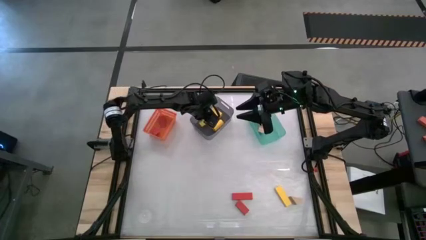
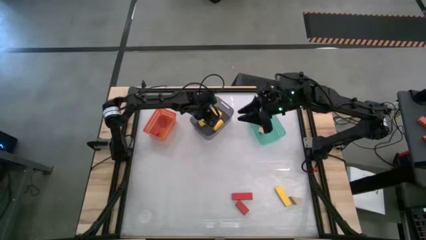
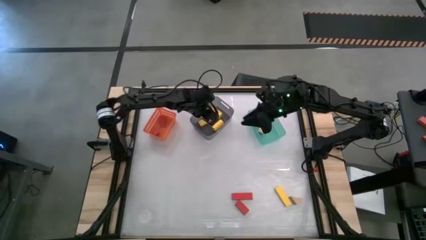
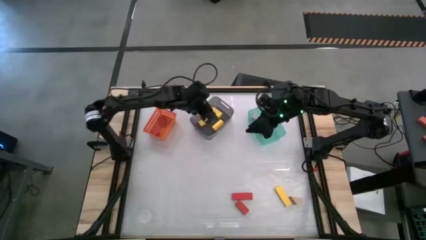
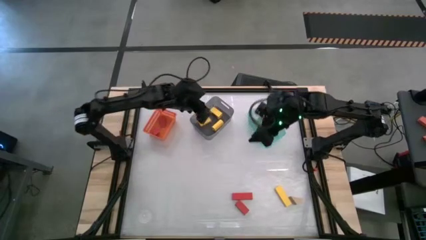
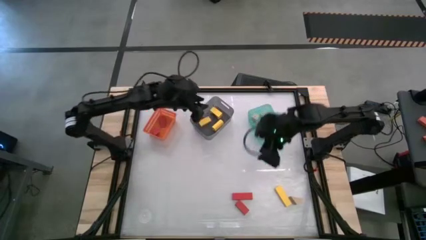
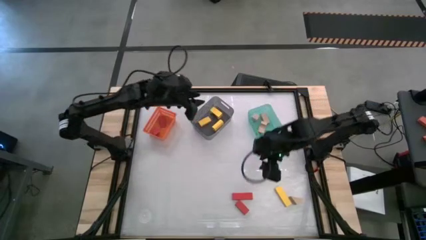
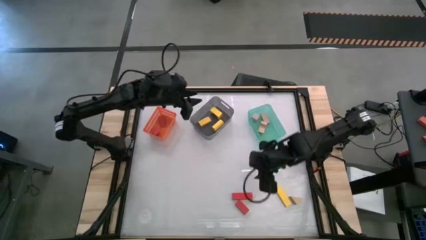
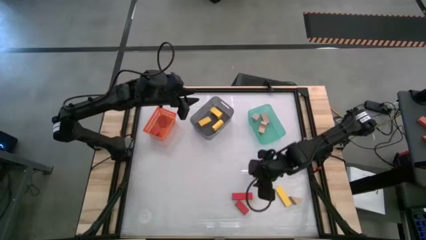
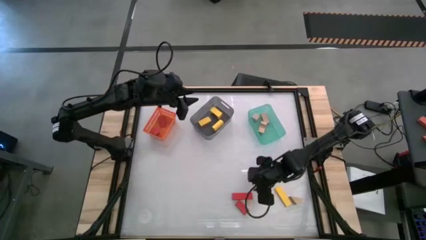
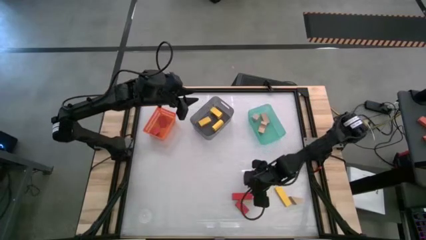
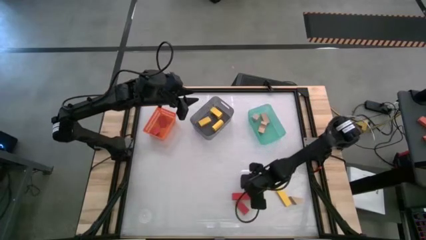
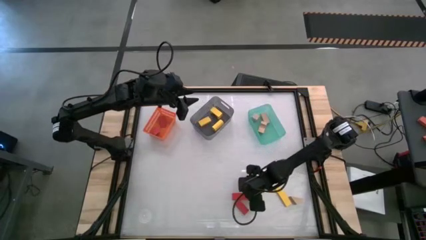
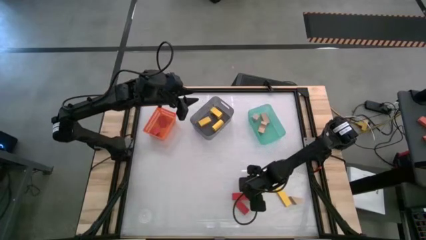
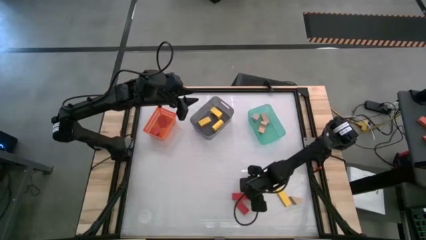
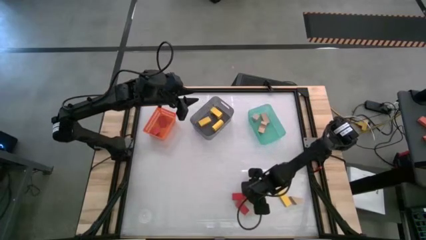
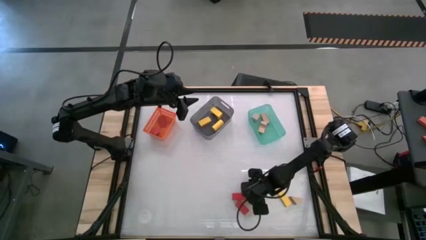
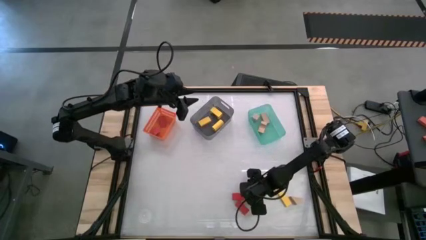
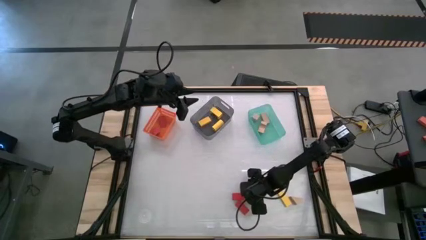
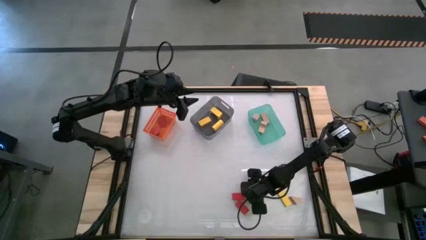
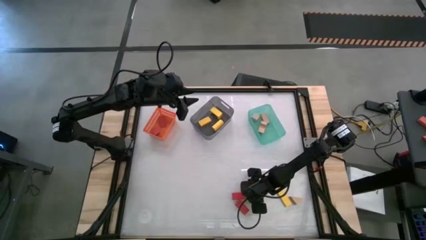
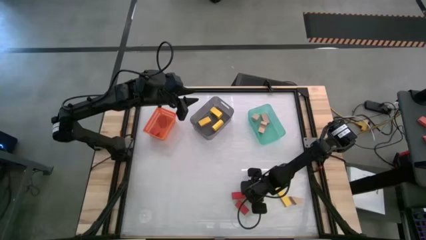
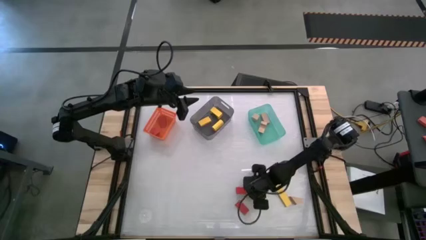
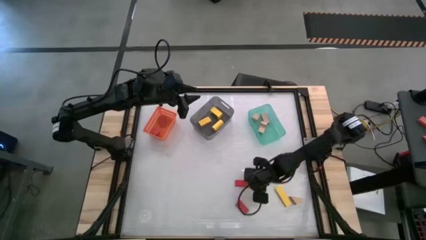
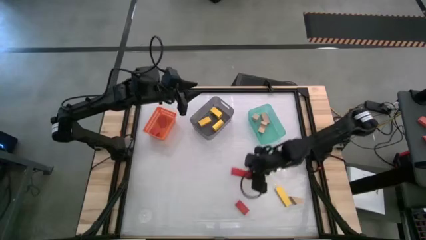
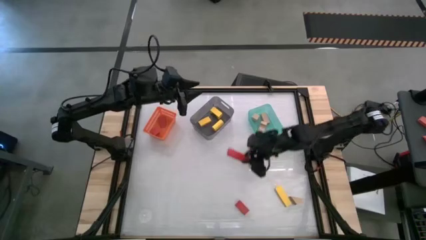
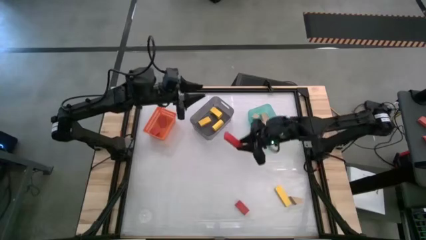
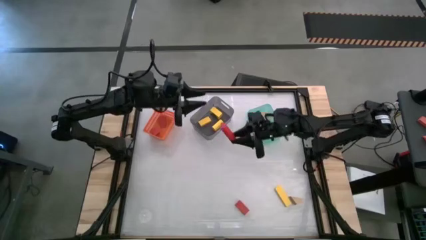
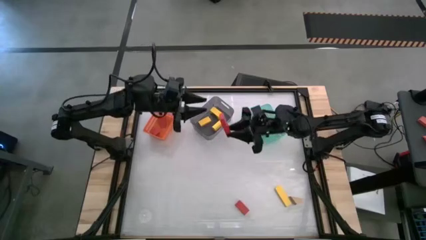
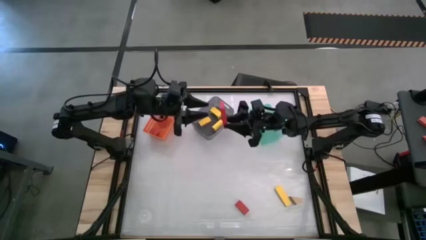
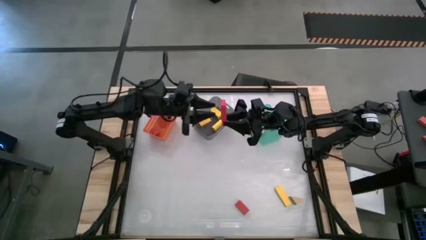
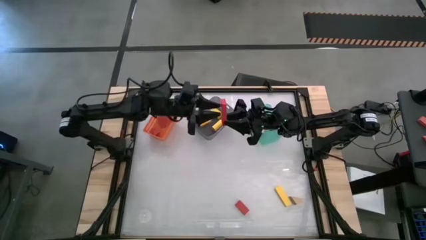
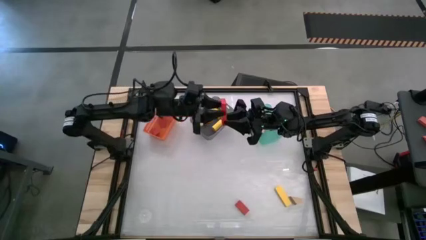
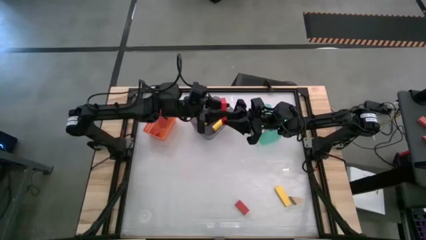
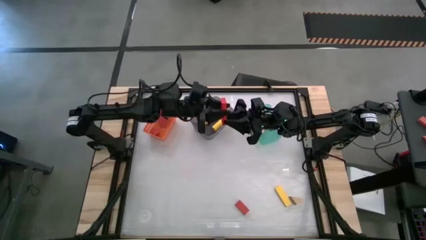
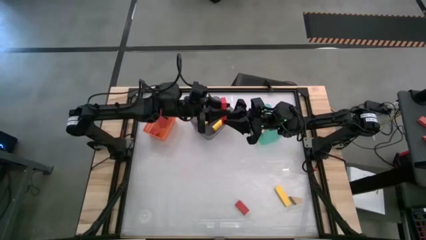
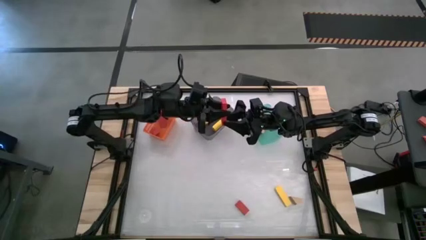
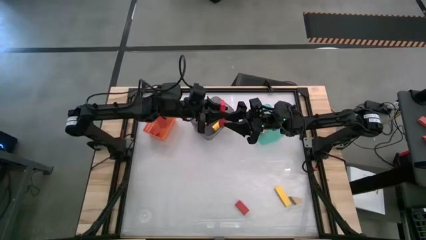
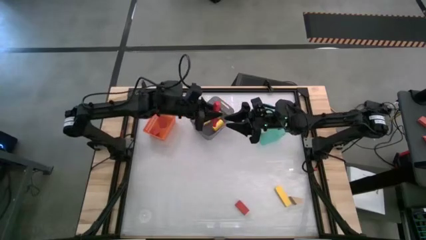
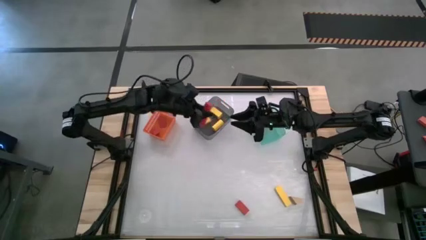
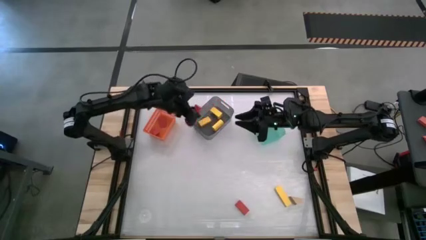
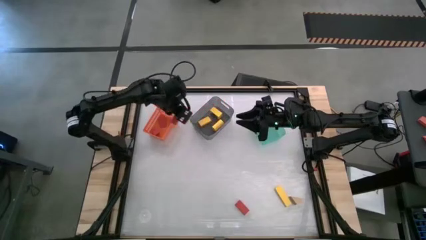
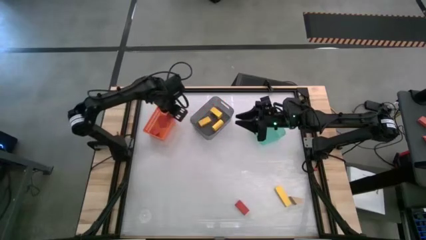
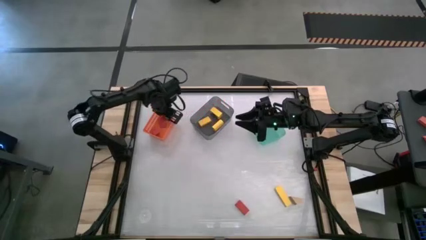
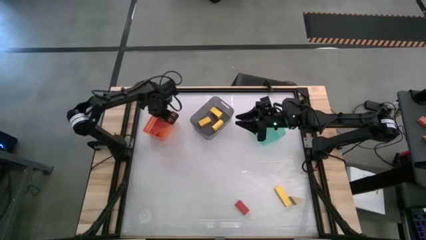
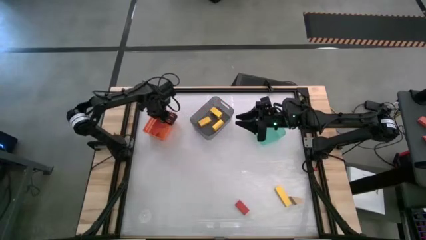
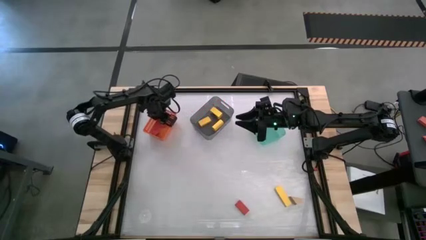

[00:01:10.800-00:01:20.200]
Task: Sort & place blocks by color
Put the red block into the orange bin

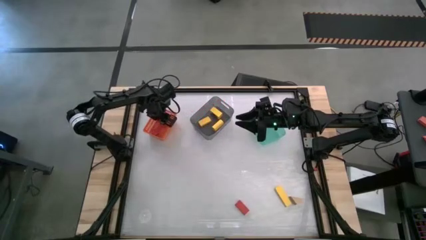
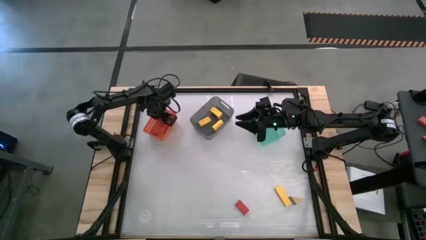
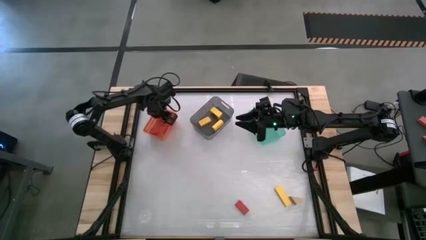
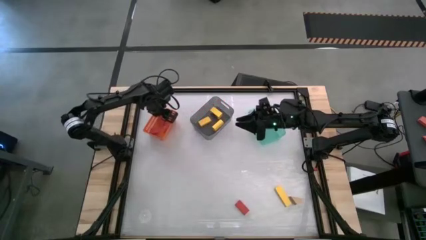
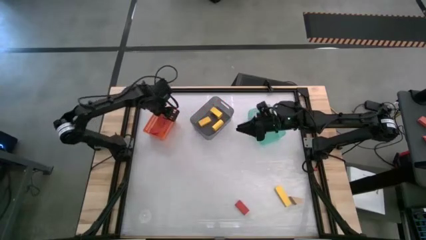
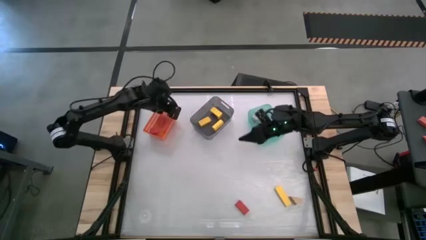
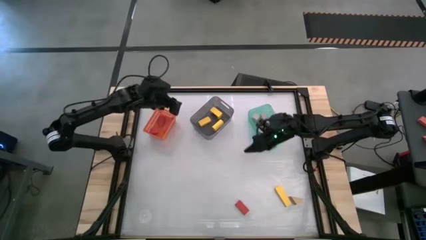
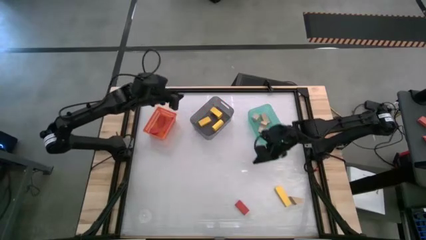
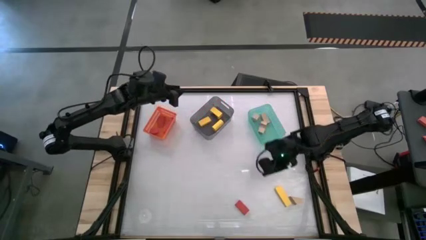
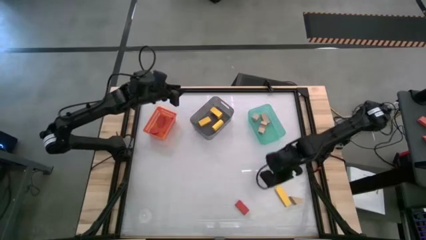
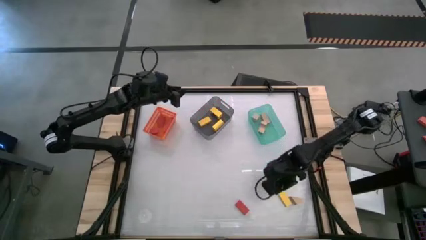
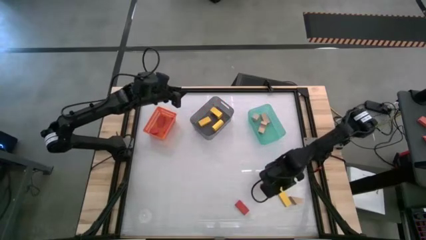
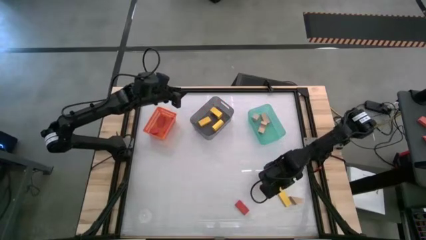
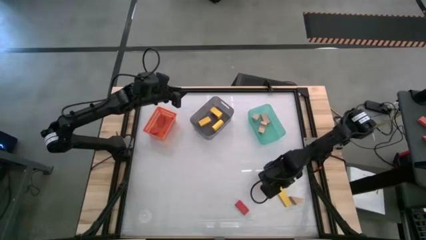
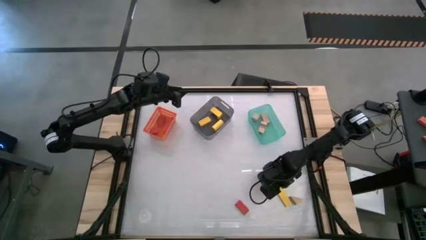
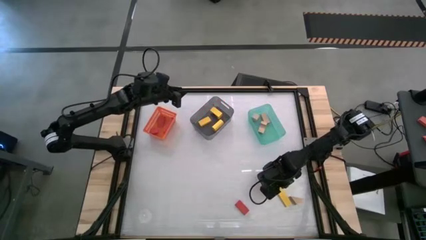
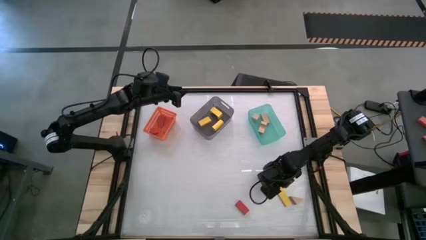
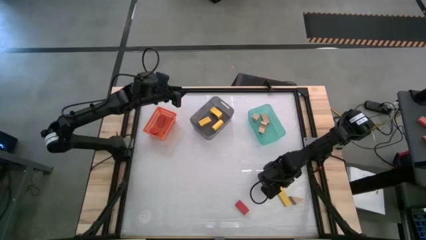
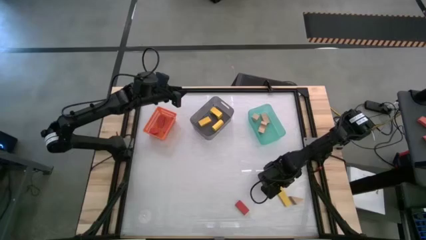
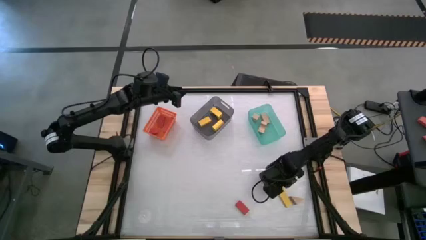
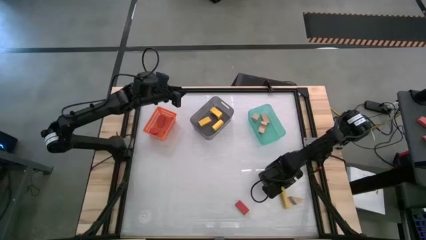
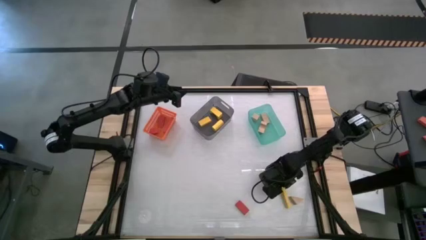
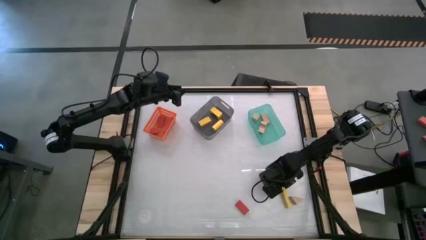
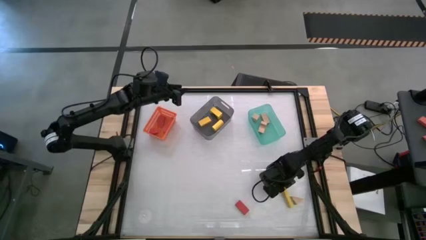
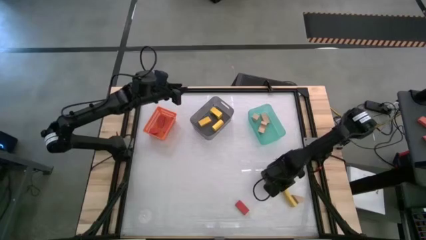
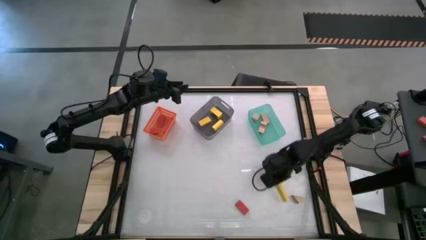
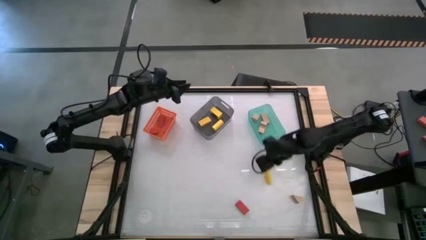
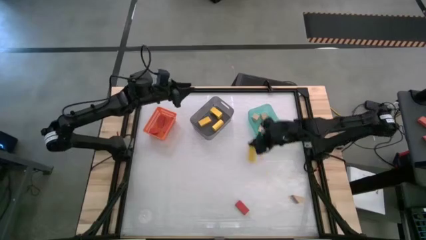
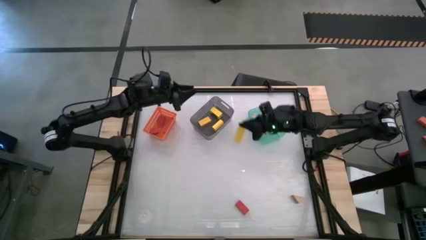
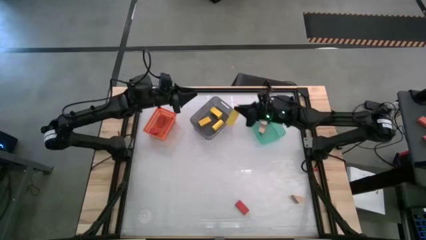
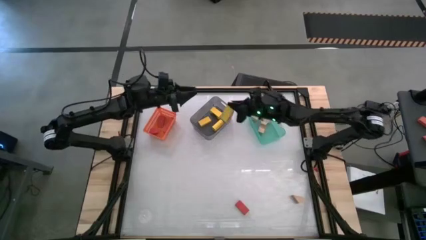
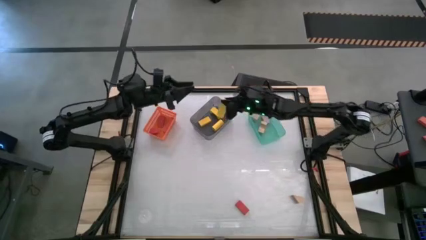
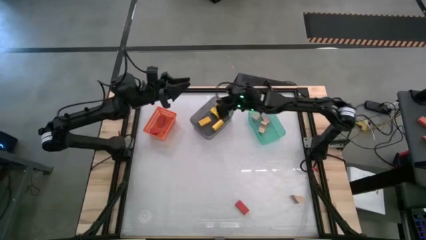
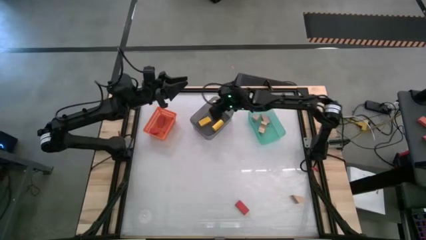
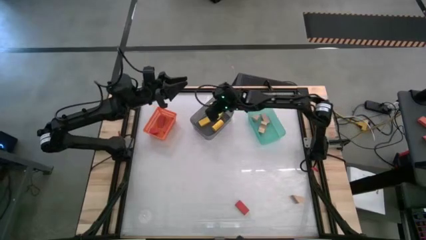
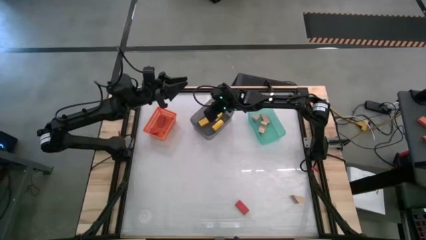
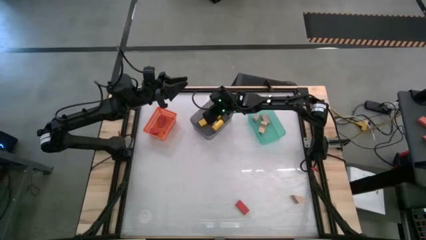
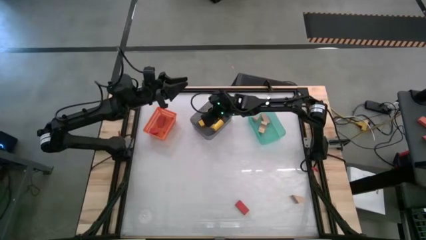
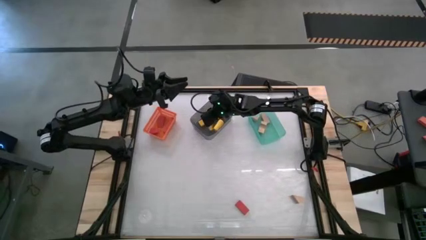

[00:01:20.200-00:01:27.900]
Put the yellow block into the black bin
